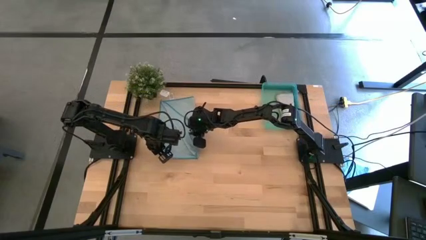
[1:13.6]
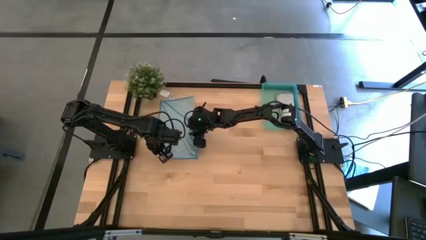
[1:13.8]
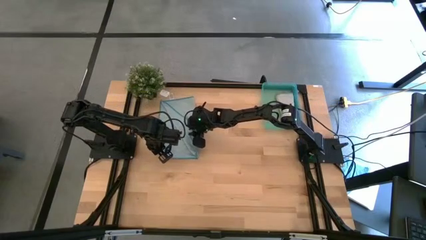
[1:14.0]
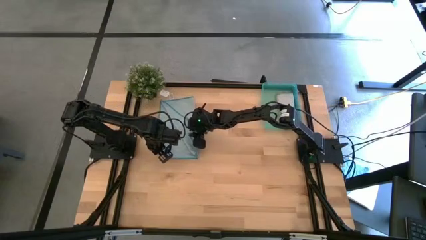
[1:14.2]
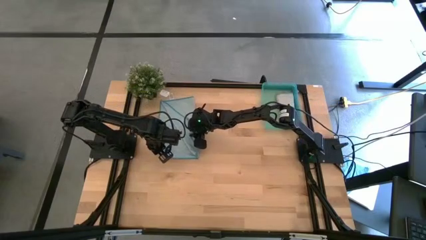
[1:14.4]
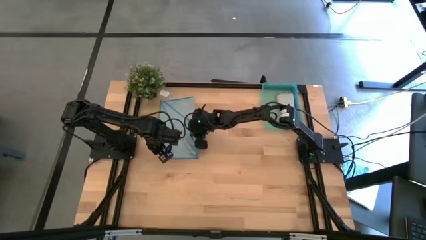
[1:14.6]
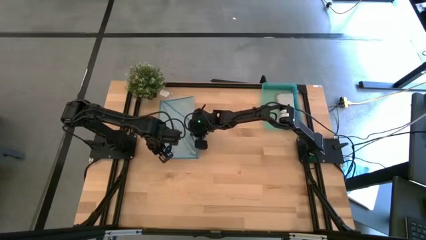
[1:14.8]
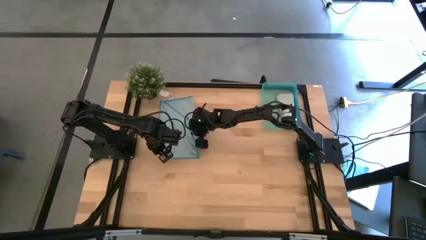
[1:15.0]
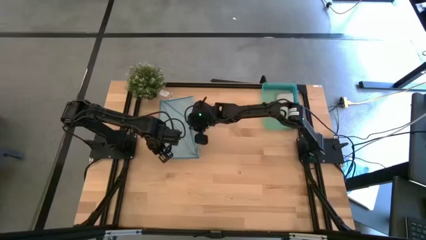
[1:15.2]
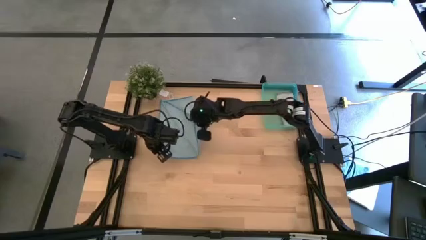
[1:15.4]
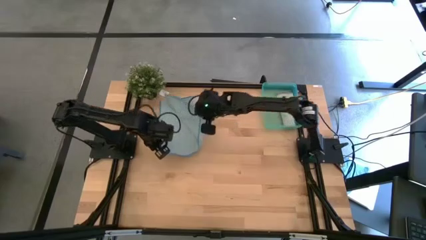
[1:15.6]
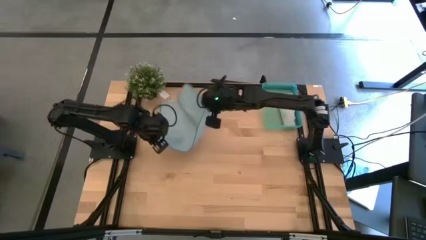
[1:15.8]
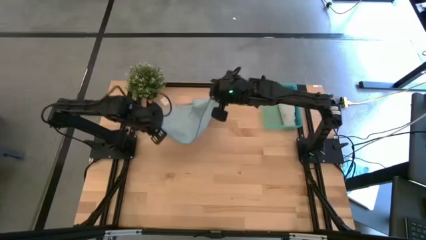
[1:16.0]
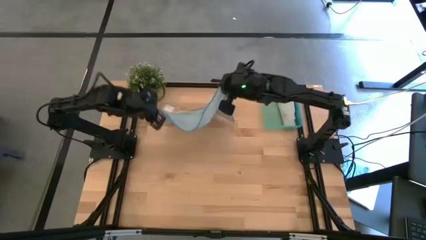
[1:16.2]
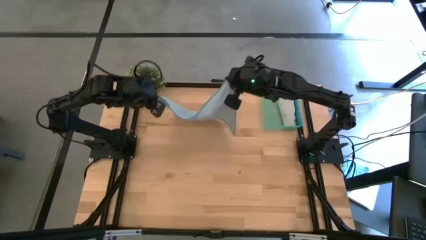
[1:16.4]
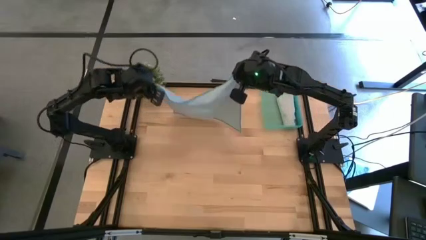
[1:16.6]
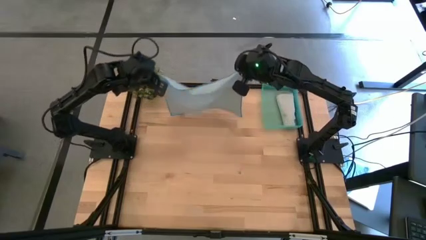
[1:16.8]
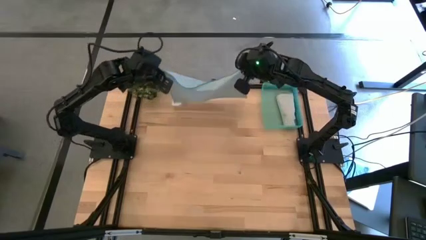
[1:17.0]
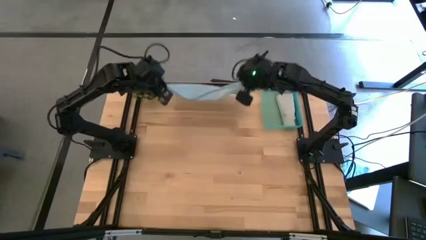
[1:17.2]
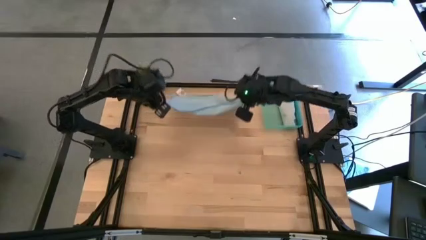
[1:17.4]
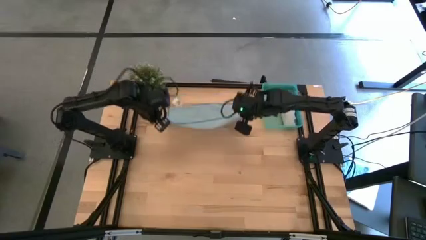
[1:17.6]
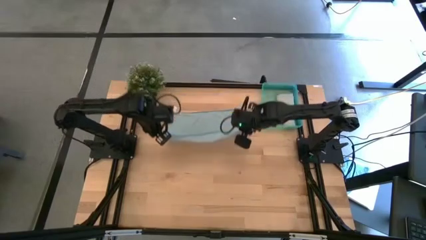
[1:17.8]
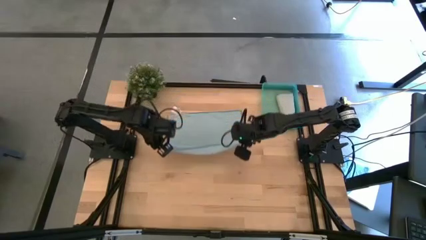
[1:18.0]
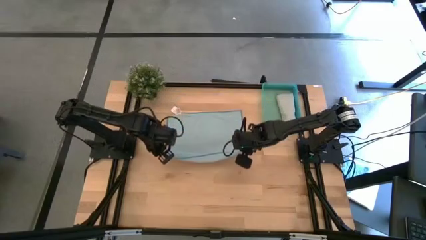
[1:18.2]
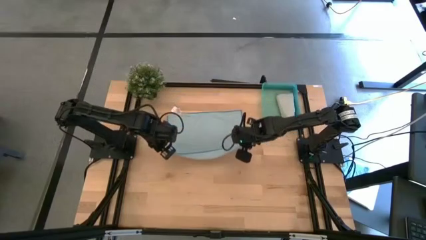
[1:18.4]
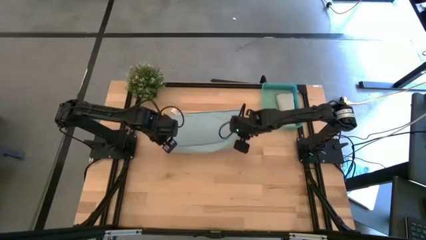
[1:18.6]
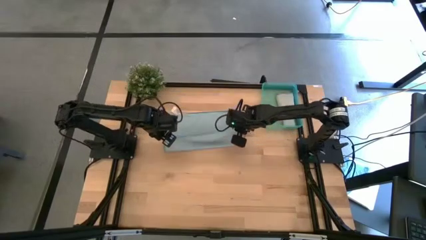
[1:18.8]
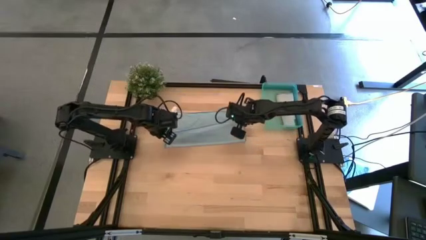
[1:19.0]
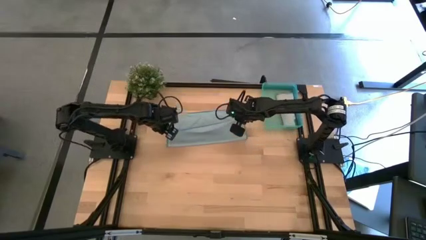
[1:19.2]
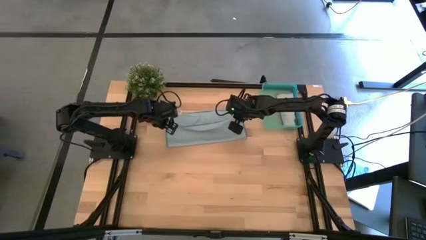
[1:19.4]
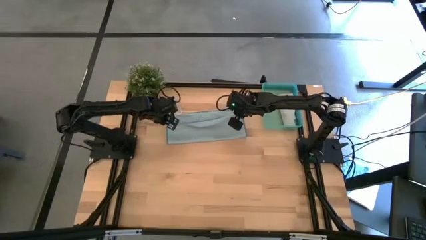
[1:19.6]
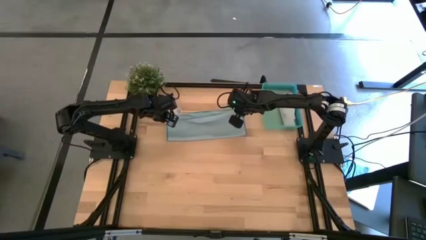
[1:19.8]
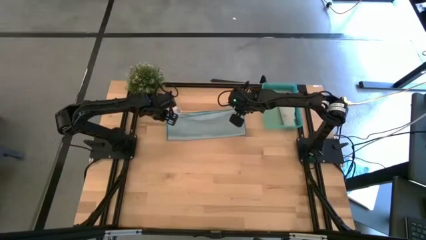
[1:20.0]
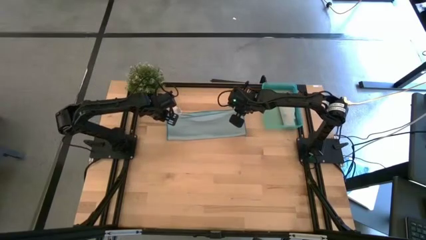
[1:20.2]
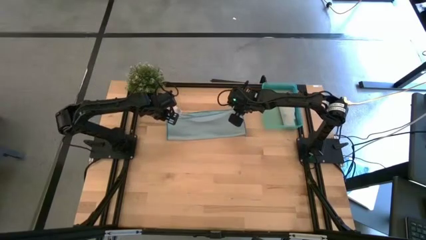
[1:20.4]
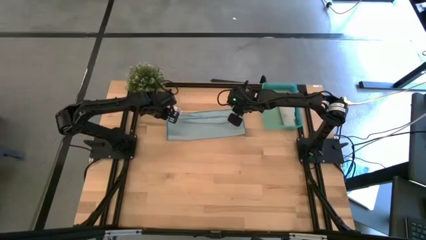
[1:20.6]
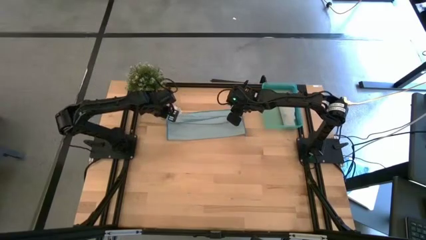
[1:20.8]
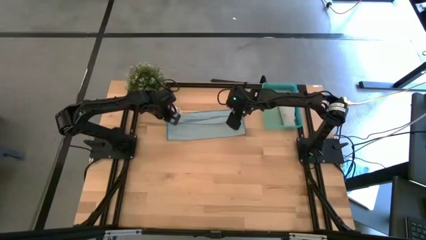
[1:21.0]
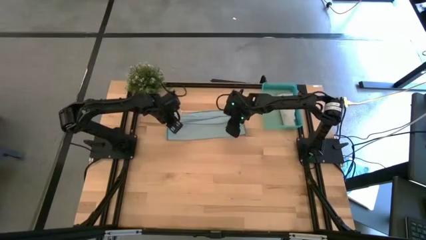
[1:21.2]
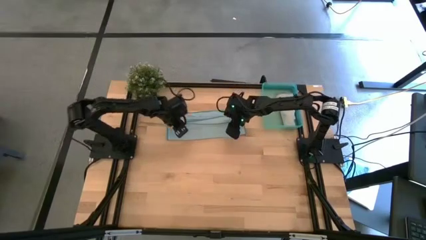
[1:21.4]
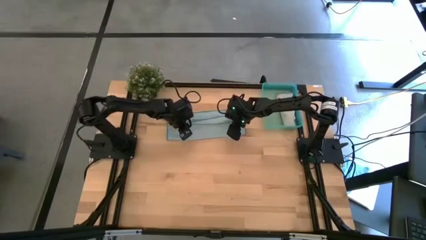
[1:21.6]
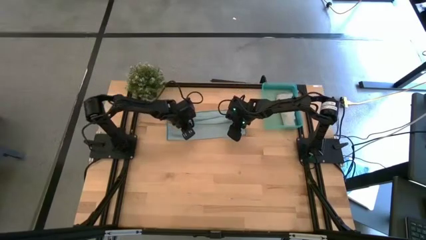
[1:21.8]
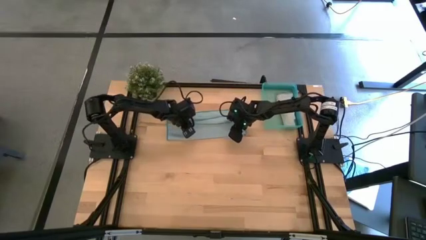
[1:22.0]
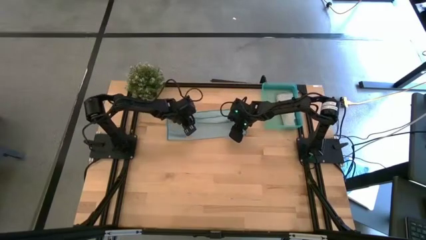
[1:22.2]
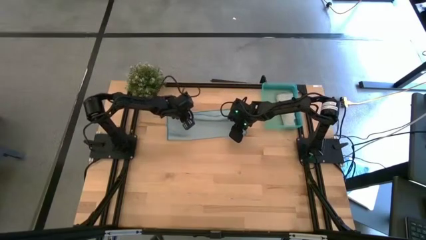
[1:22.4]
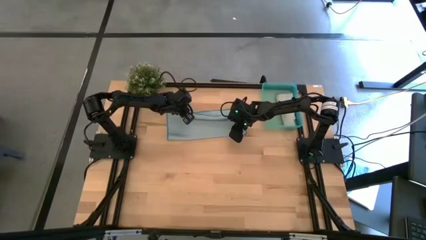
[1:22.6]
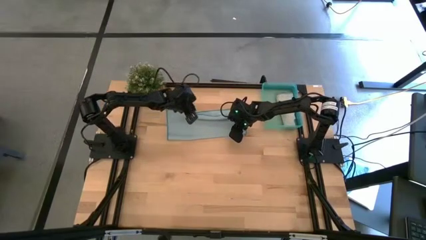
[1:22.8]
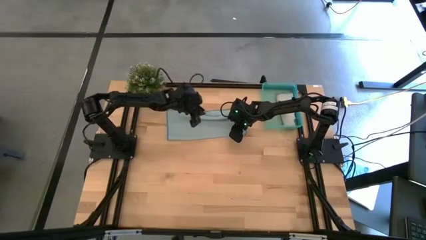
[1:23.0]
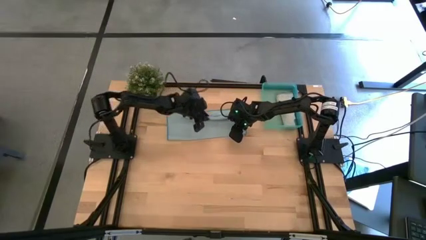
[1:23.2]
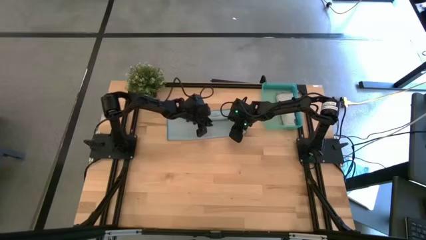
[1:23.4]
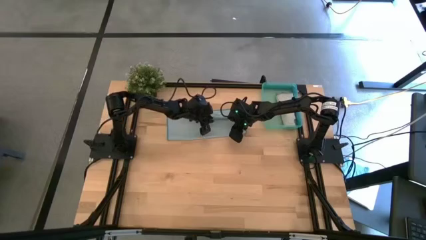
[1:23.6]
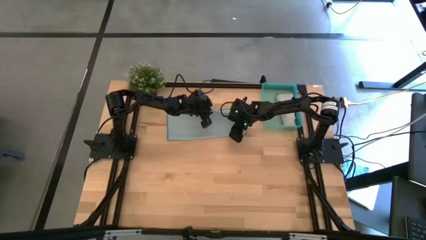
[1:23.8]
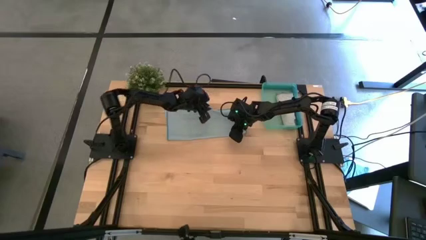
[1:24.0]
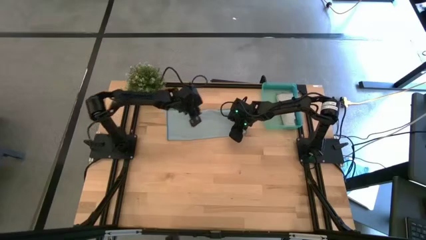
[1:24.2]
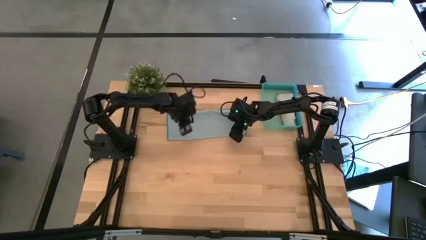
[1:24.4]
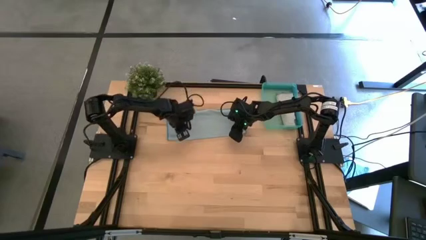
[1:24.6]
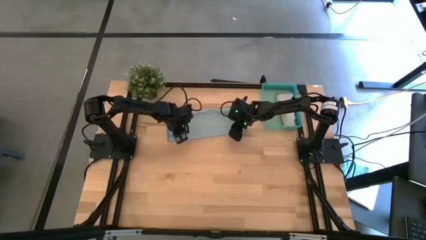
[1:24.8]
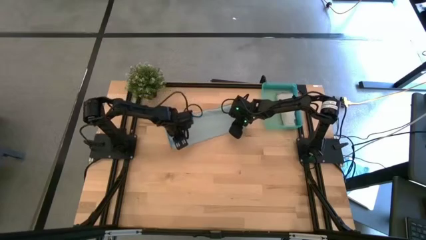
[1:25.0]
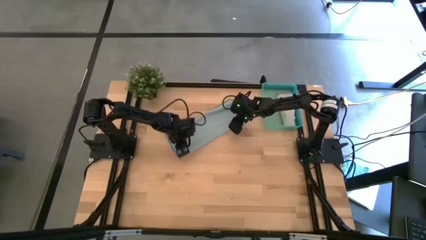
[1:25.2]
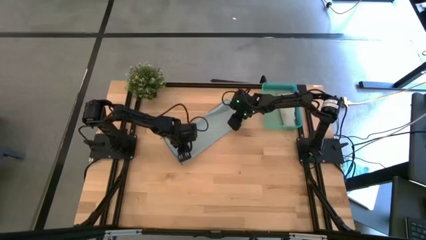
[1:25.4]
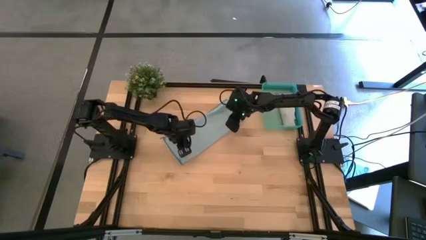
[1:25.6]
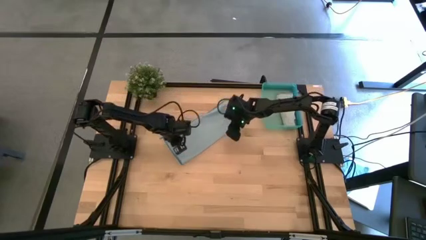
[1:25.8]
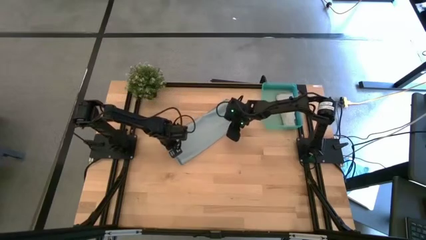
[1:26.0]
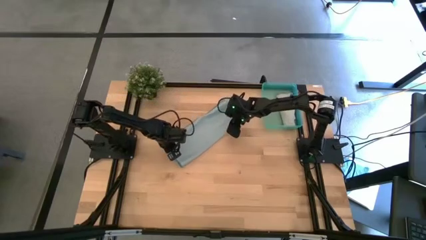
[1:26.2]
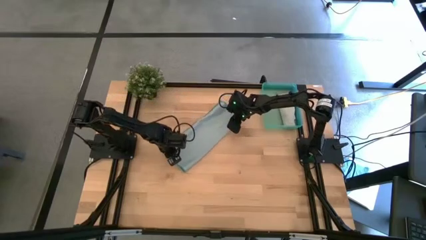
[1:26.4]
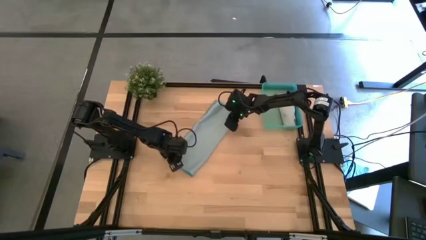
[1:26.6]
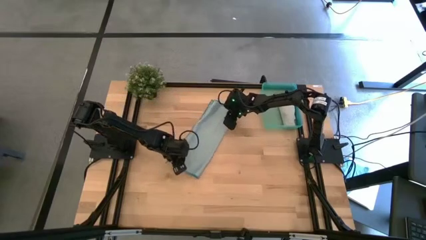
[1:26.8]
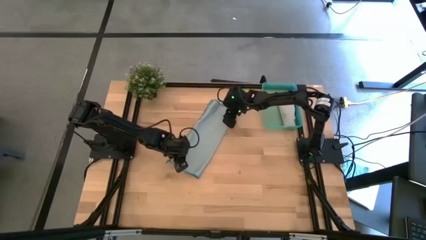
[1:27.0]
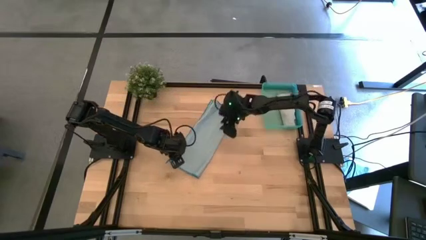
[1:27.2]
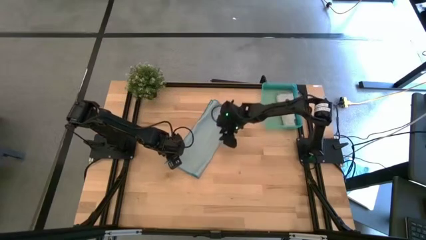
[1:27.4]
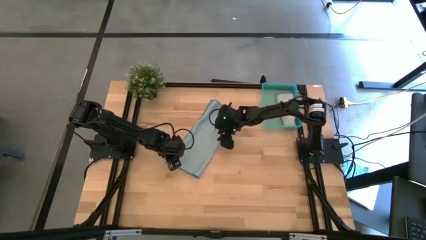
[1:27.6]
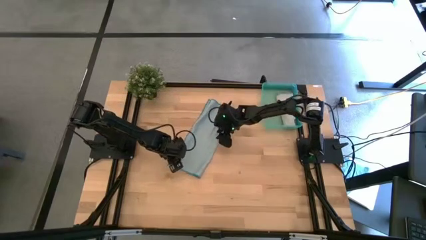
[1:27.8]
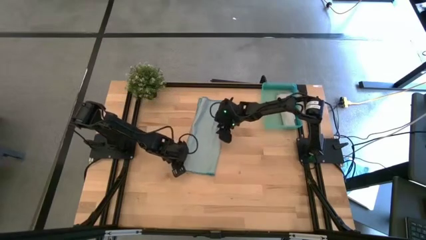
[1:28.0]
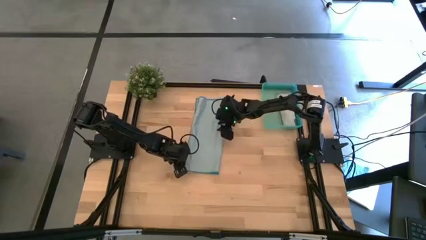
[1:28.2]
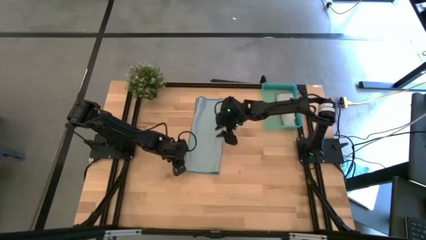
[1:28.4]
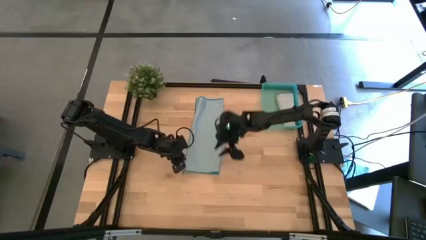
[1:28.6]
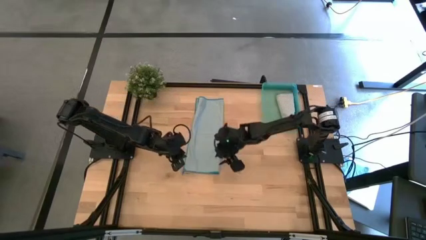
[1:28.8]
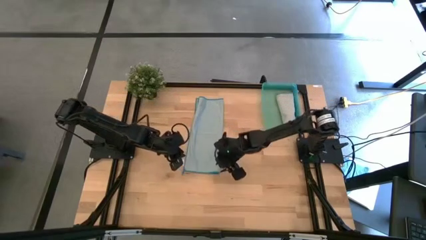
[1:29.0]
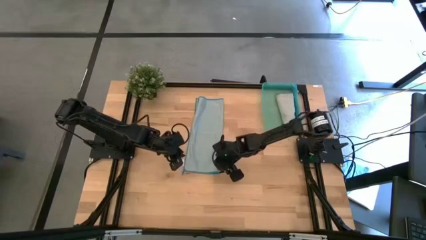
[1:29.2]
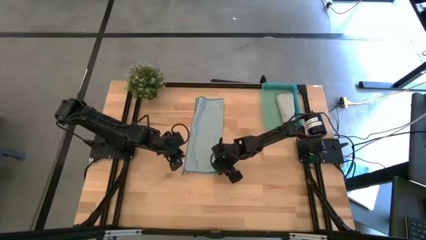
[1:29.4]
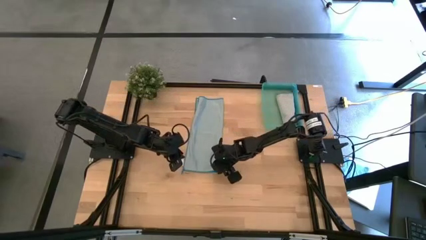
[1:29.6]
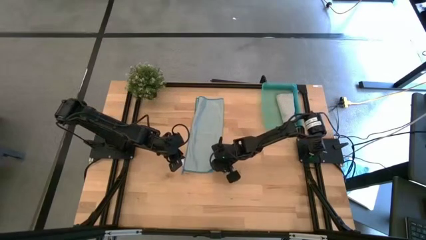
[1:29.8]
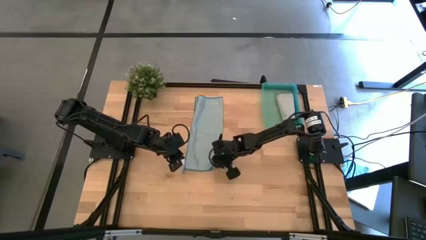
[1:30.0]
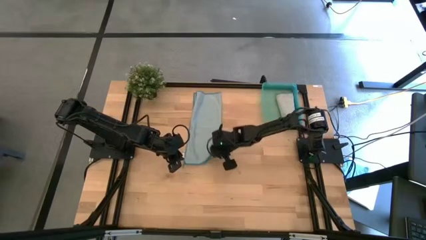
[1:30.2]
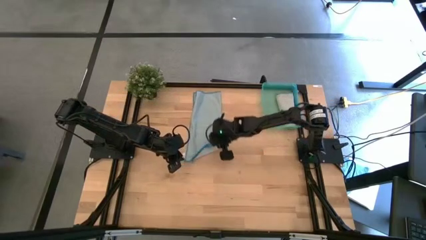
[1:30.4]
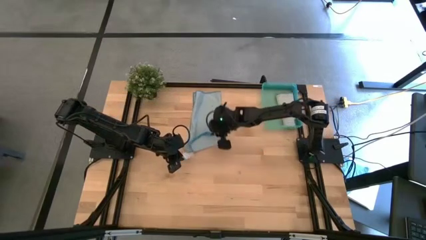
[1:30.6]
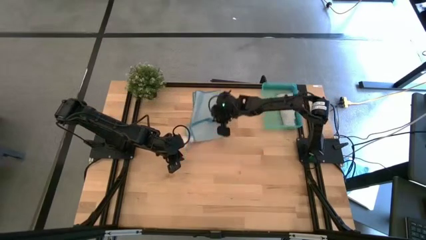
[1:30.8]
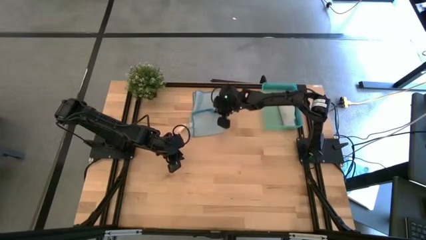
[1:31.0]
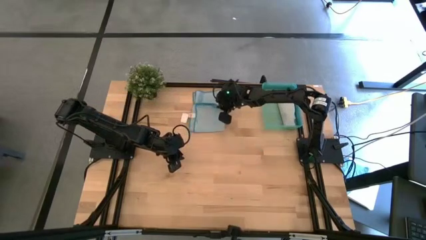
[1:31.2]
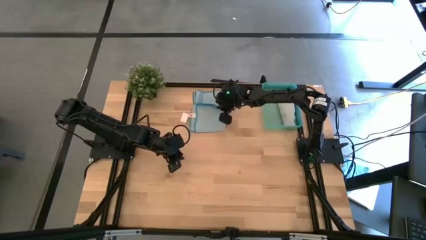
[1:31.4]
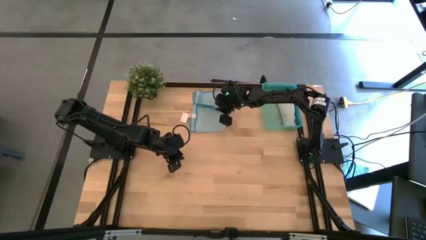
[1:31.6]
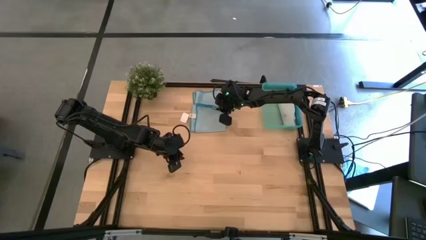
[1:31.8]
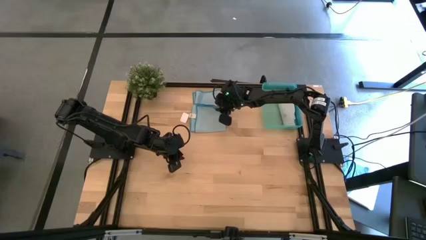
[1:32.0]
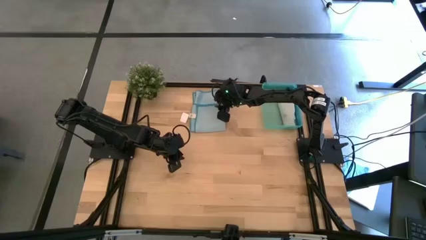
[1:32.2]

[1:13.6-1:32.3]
Task: Roll microfiber towels into tight, uniform cylinder then place into a basket
Fold the blue towel
